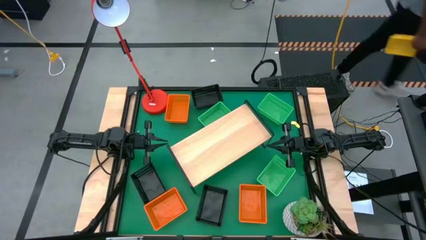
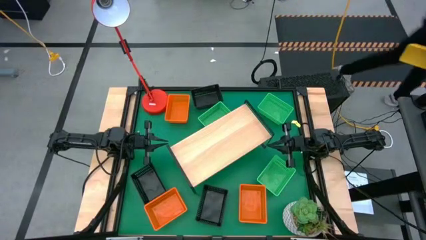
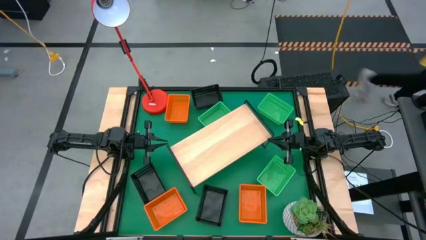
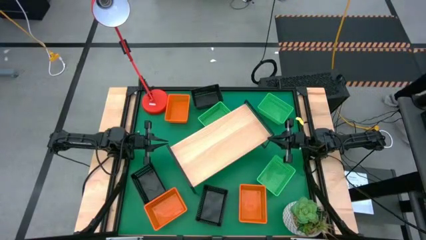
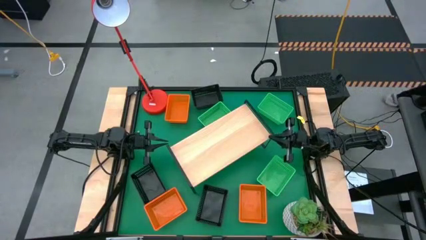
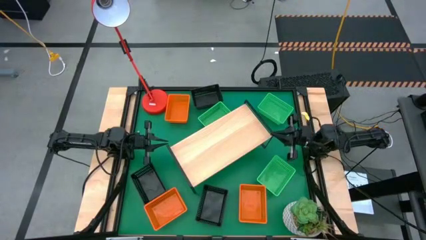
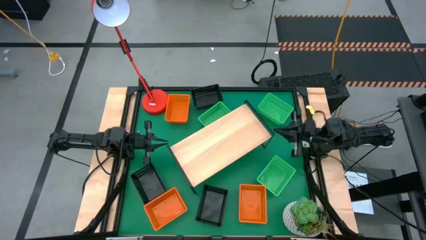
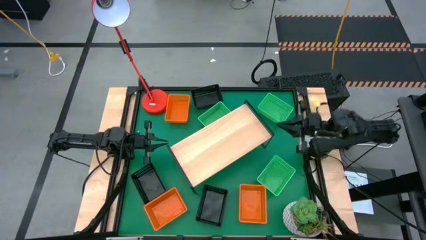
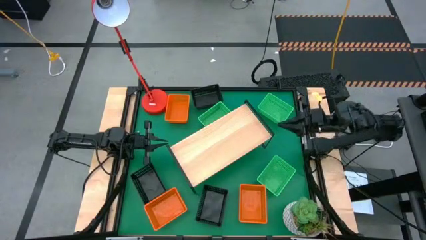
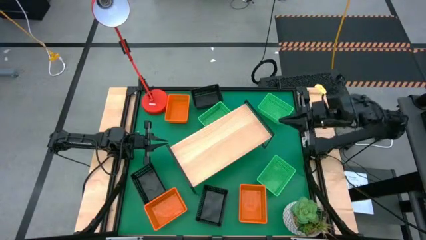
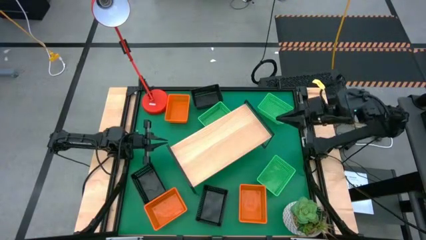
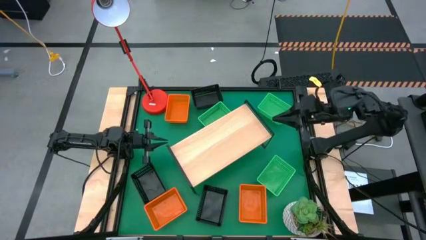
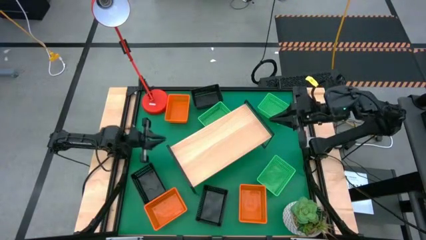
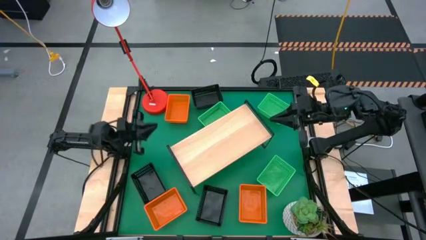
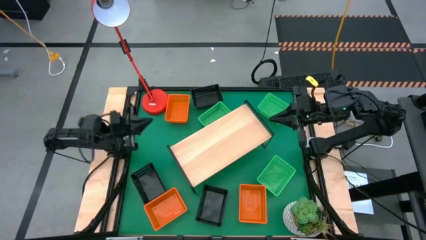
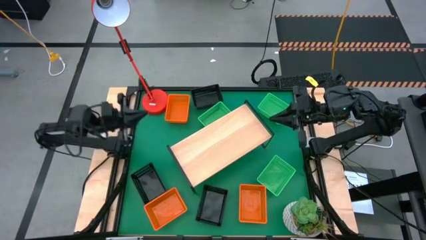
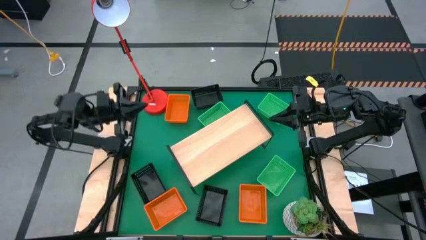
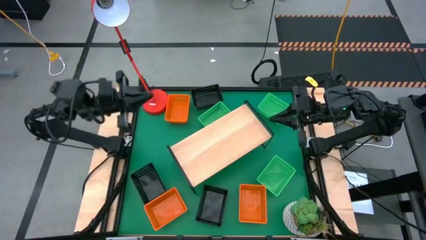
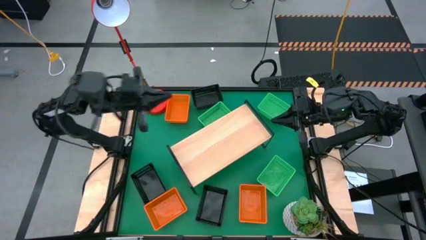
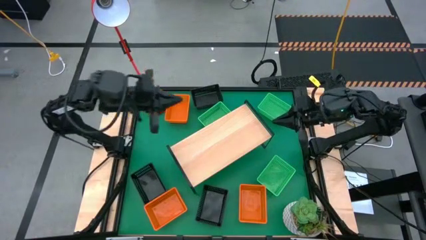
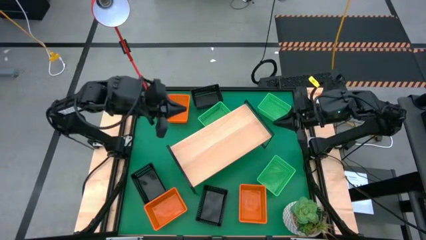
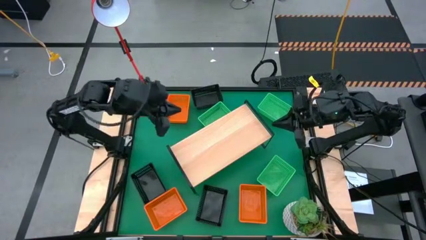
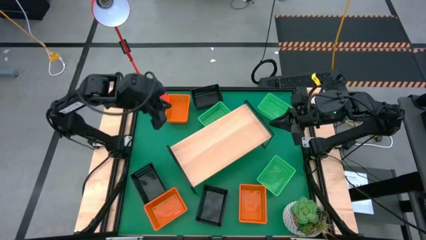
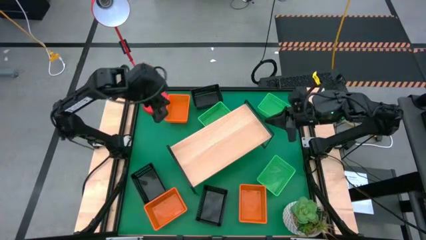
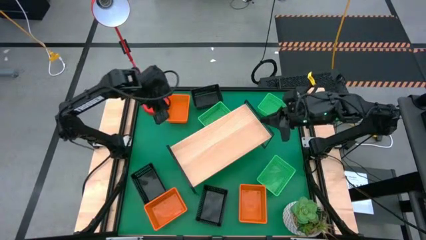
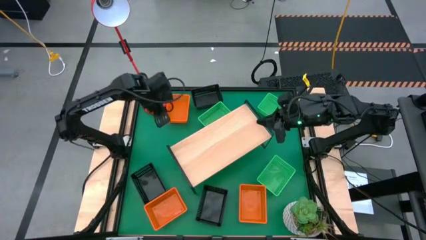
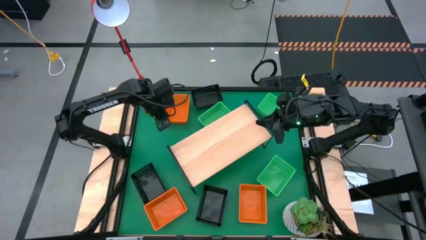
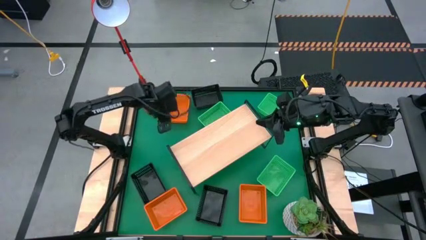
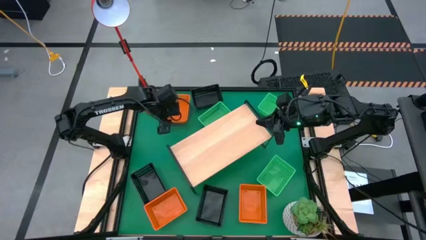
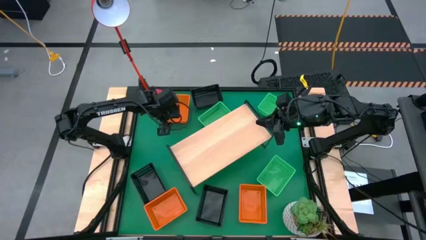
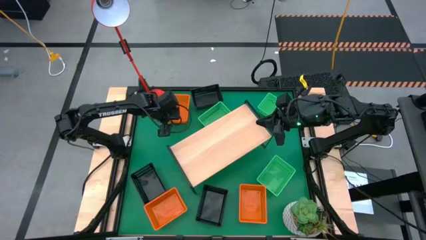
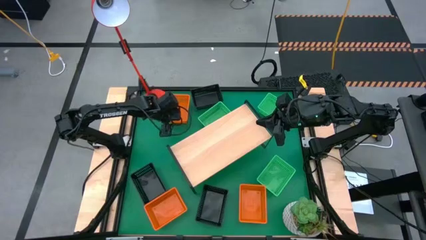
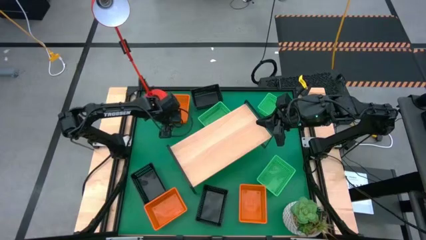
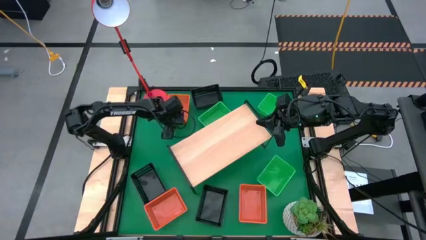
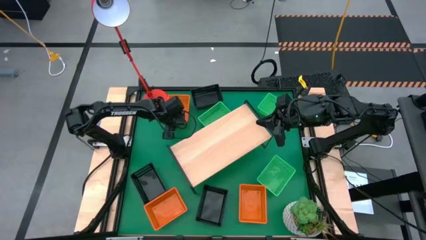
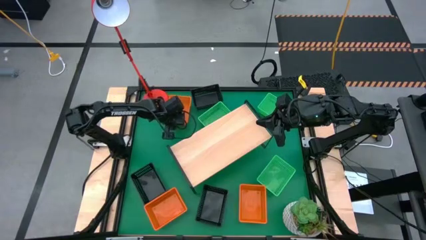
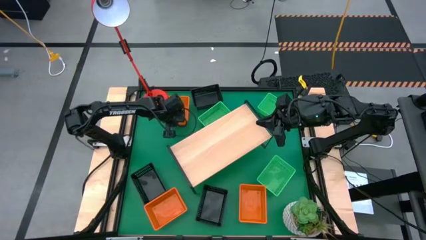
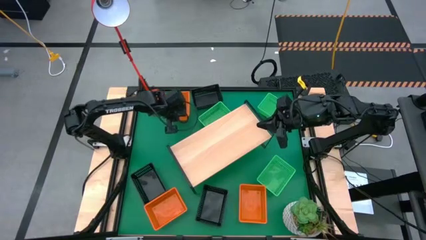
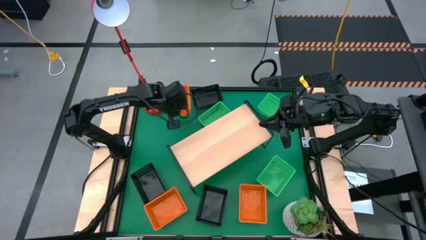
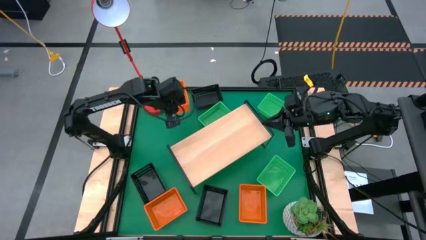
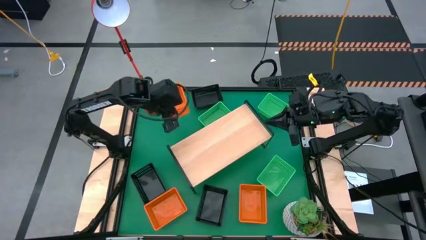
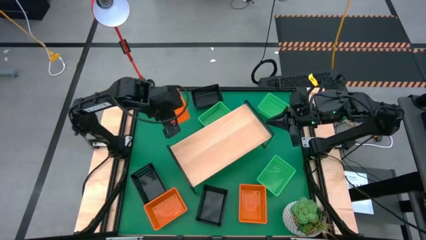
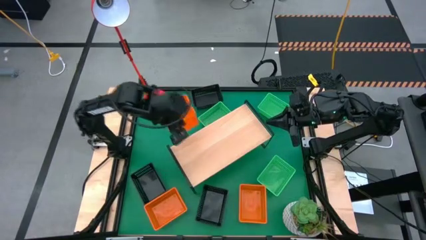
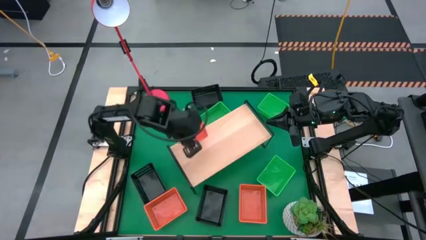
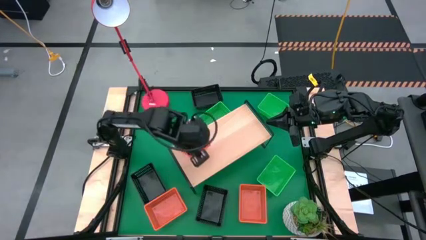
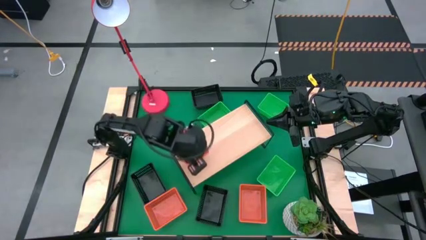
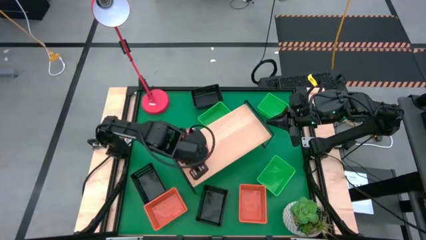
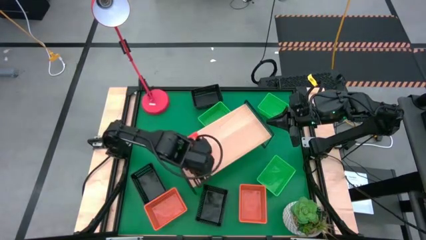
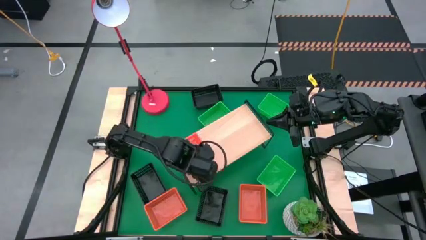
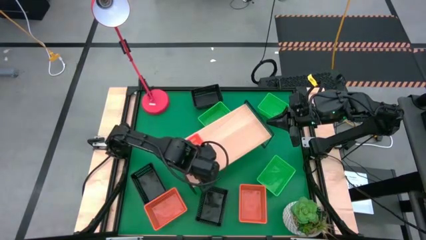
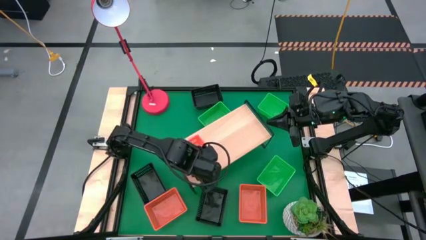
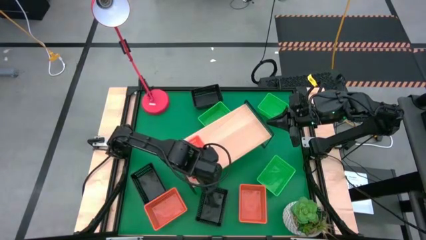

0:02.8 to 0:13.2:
Task: Stack baskets on shelf by color
Put the top orange bin on the shelf

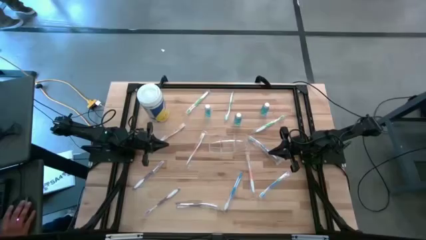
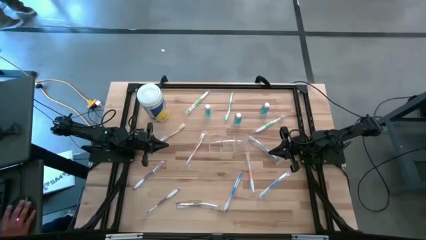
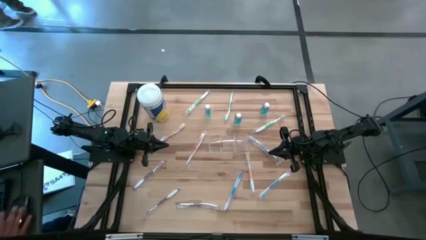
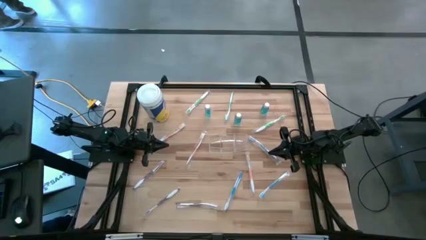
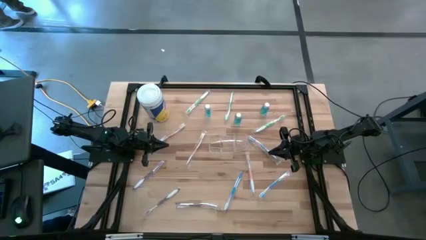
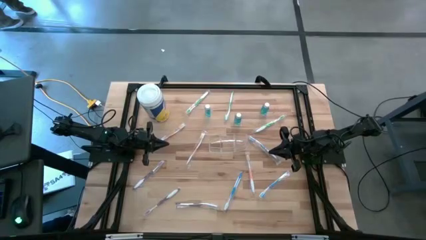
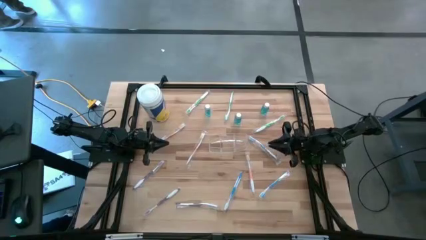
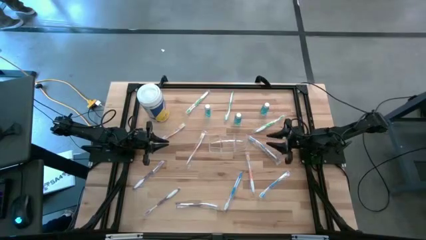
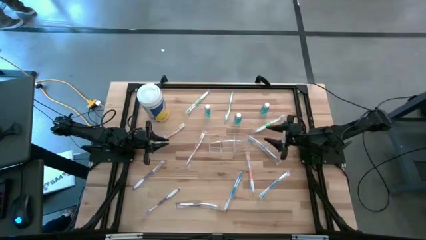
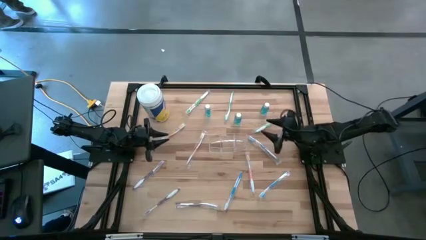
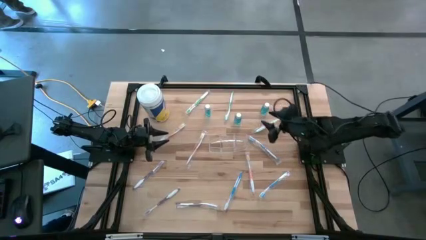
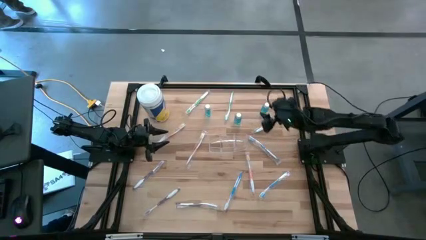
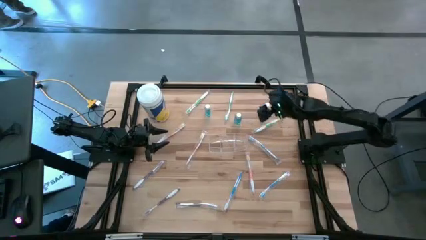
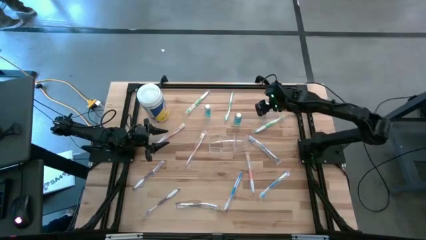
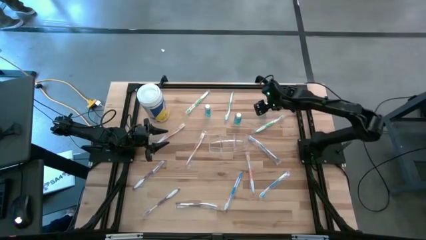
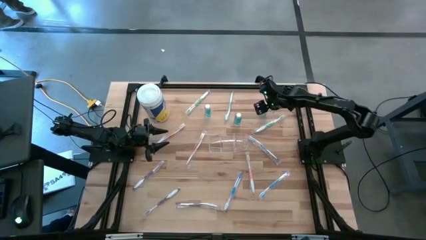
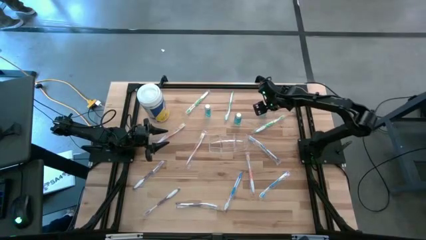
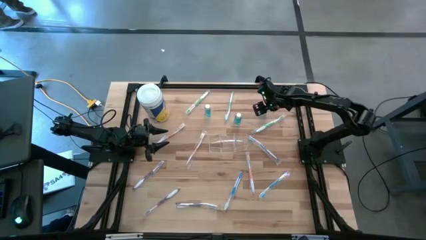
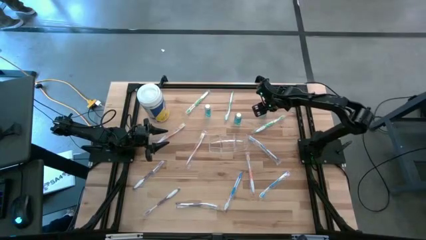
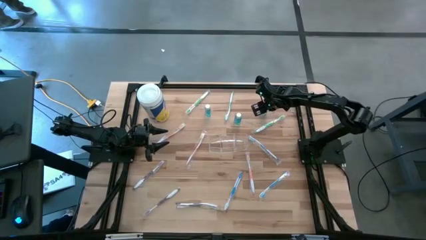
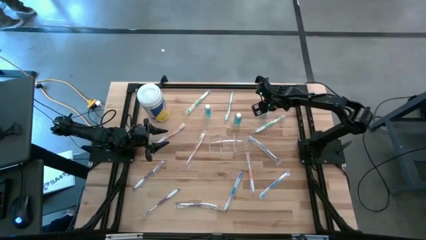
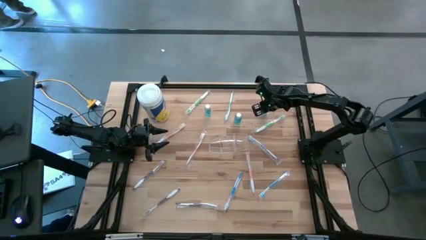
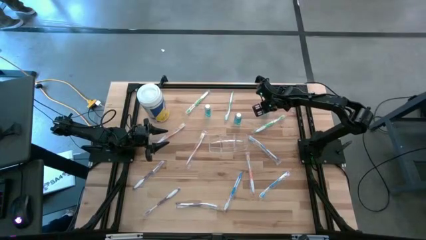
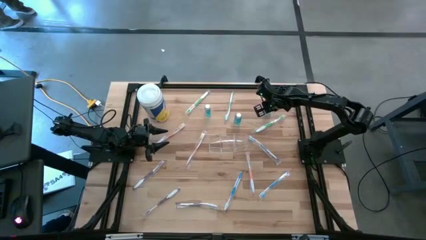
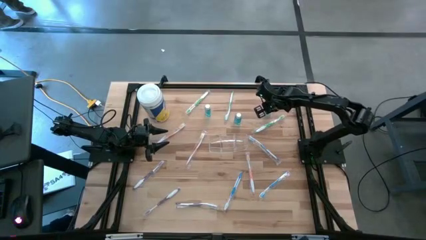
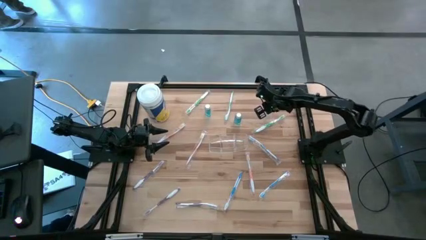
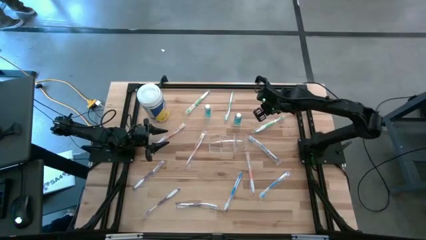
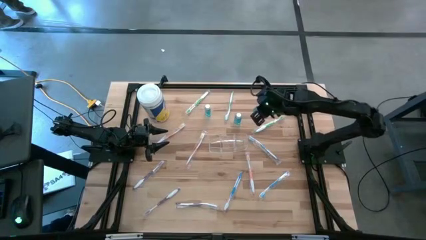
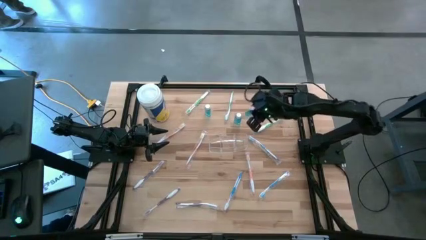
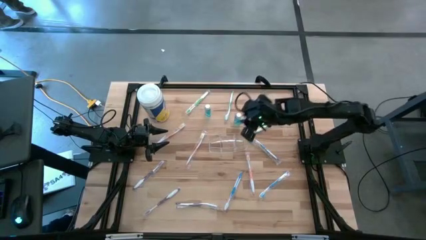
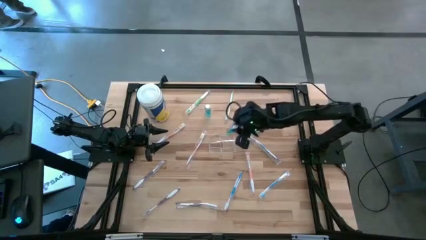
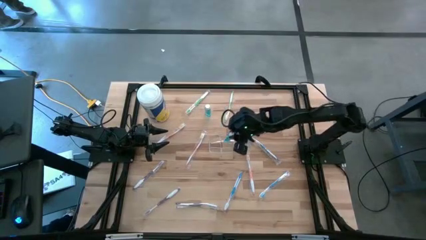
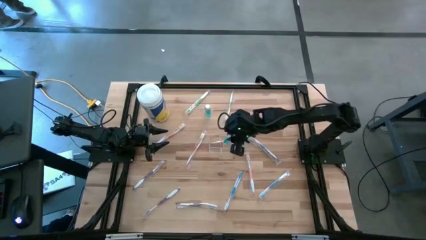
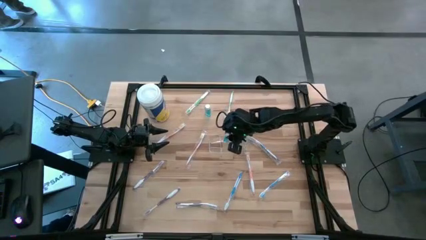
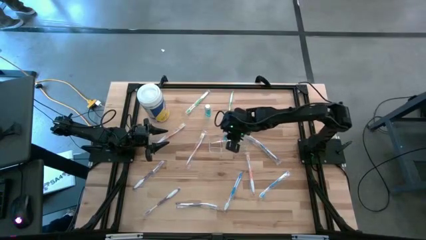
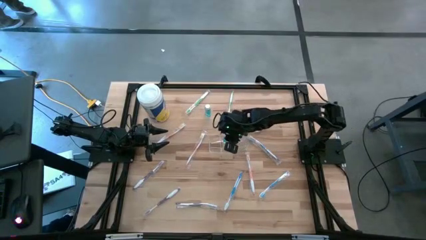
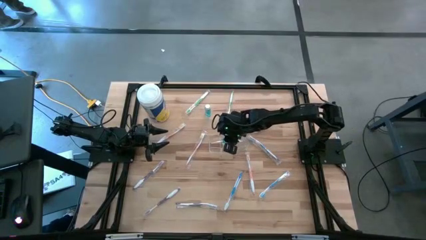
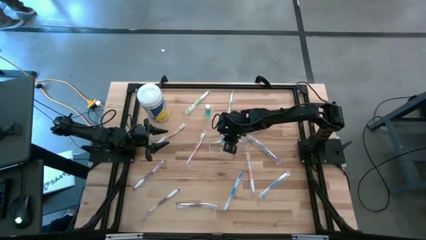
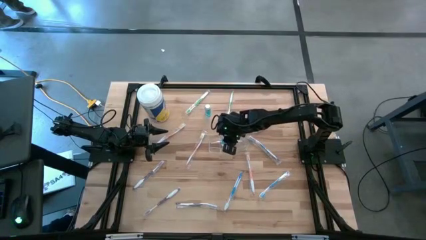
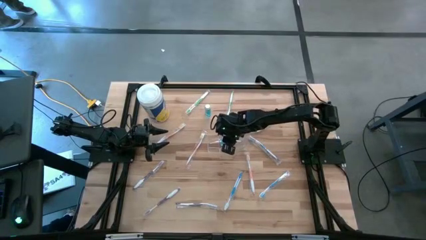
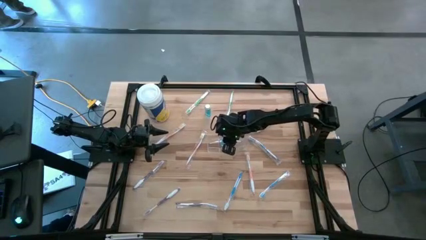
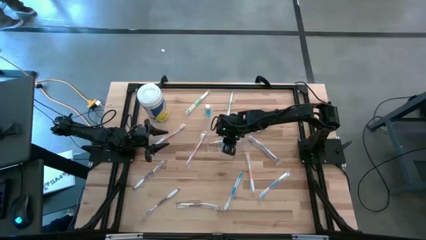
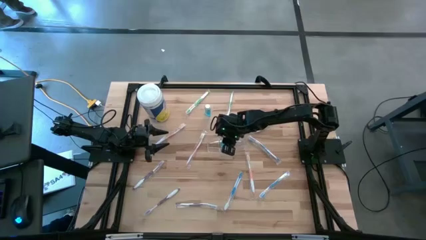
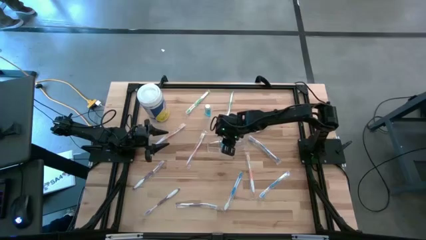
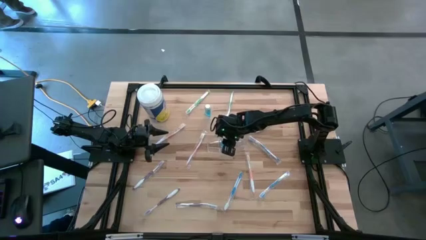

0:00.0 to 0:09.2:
Task: Pick & Place toothbrushing station
Put the top right mouthwash into the middle section of the transparent organizer
